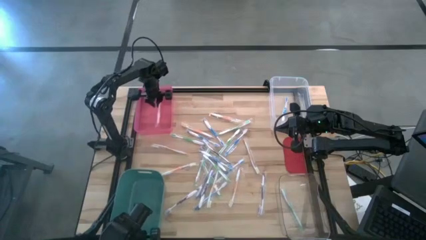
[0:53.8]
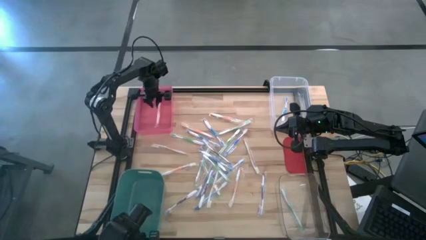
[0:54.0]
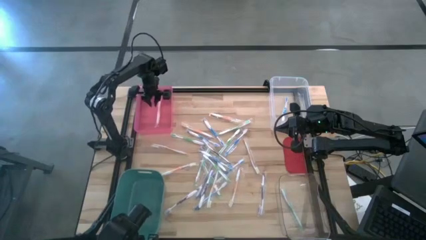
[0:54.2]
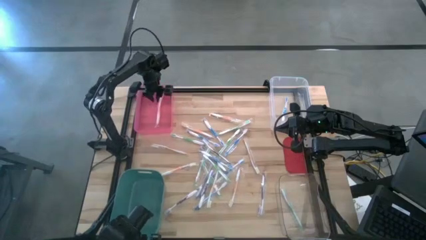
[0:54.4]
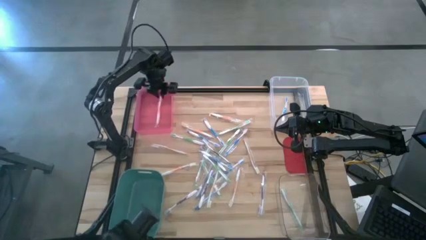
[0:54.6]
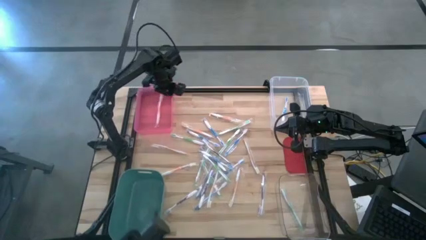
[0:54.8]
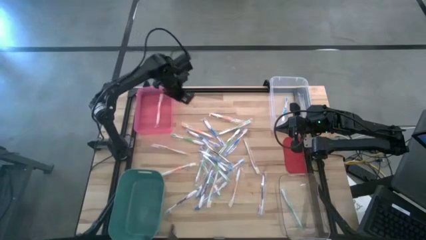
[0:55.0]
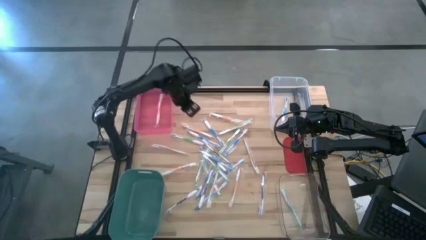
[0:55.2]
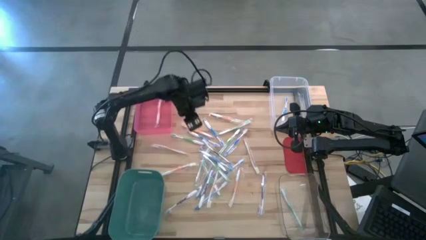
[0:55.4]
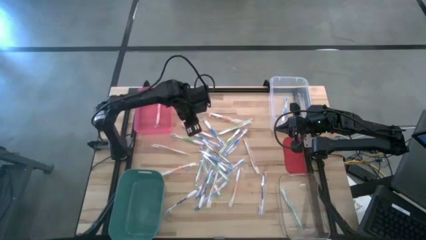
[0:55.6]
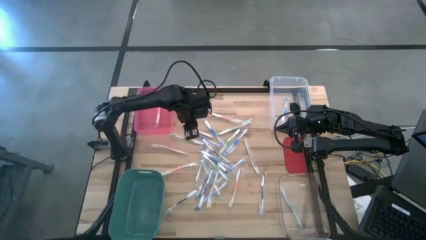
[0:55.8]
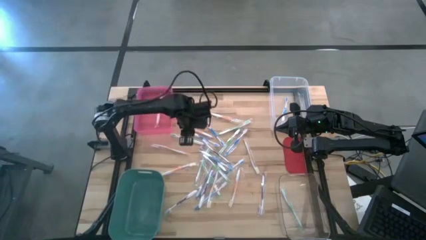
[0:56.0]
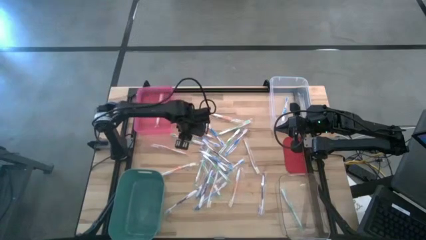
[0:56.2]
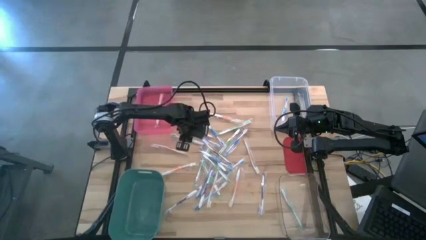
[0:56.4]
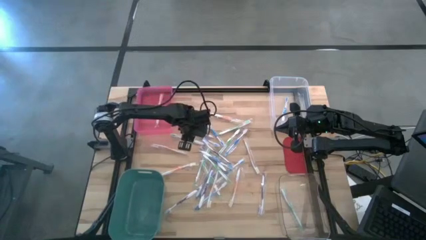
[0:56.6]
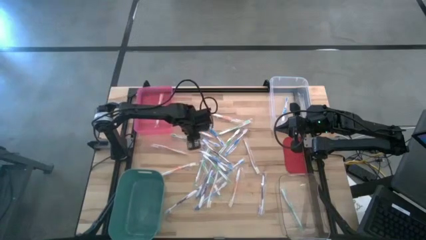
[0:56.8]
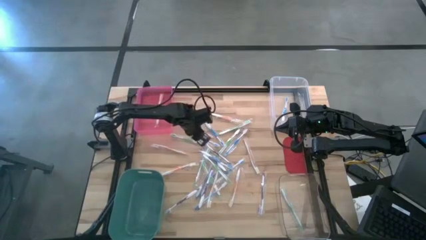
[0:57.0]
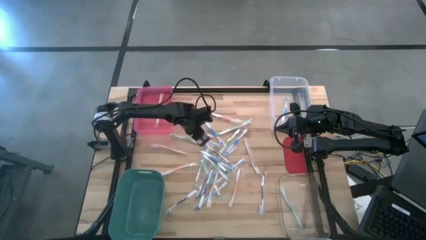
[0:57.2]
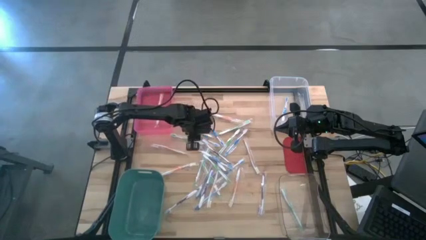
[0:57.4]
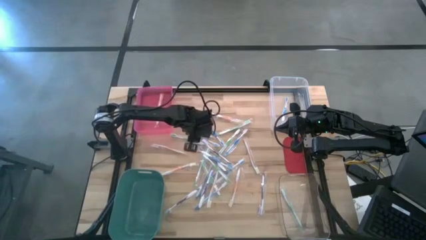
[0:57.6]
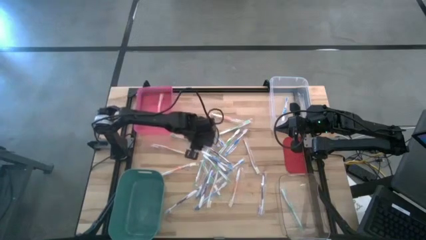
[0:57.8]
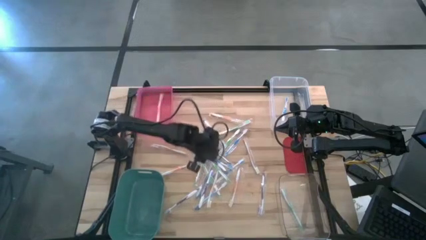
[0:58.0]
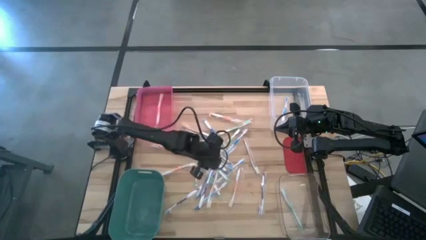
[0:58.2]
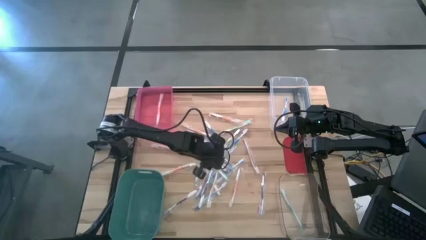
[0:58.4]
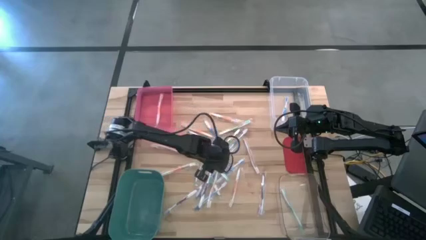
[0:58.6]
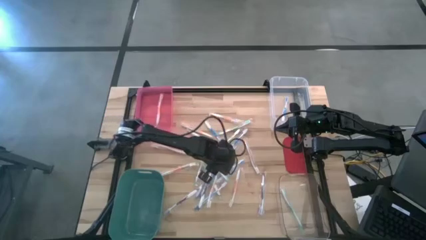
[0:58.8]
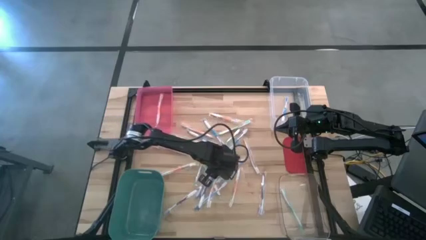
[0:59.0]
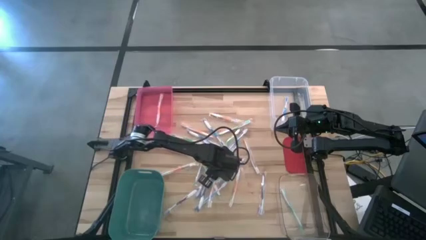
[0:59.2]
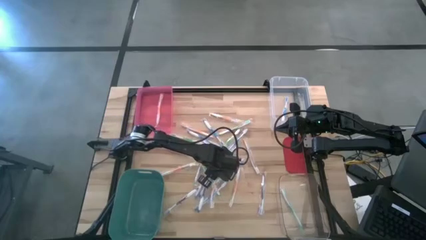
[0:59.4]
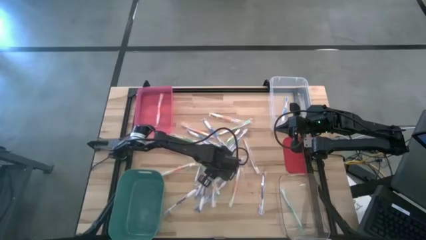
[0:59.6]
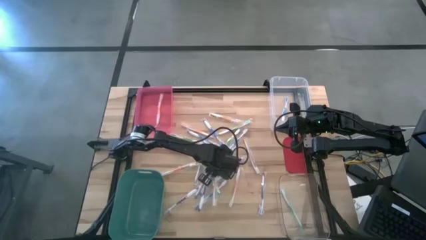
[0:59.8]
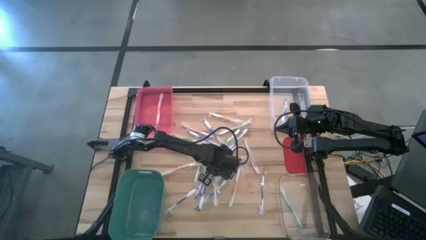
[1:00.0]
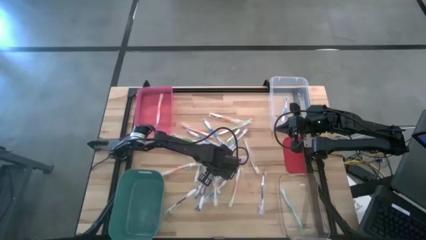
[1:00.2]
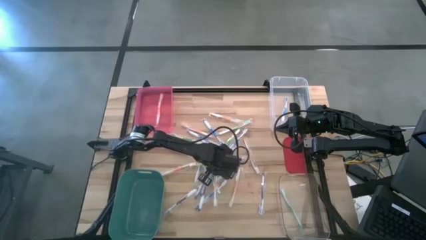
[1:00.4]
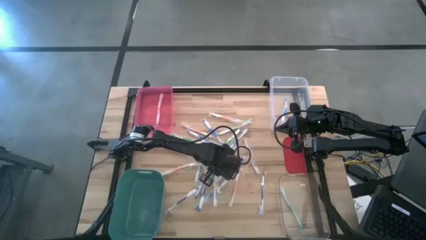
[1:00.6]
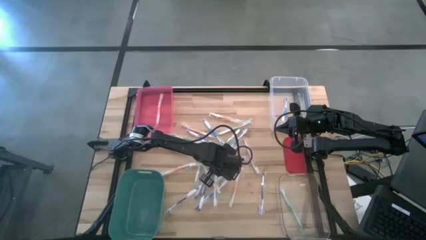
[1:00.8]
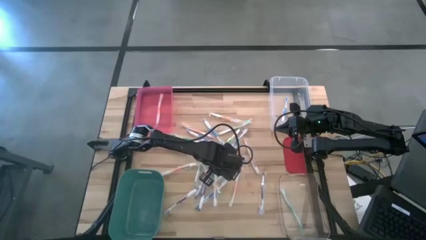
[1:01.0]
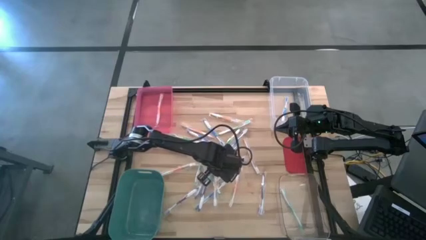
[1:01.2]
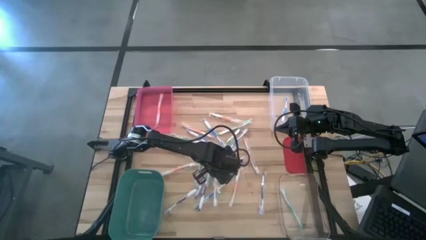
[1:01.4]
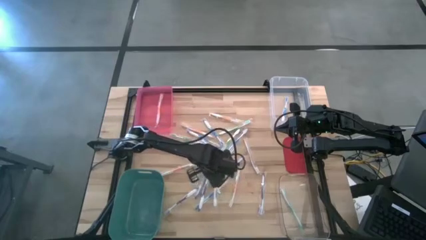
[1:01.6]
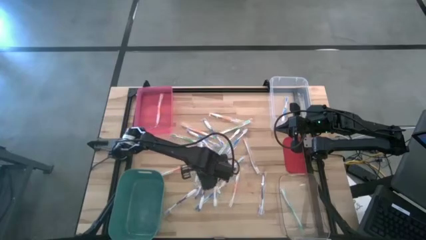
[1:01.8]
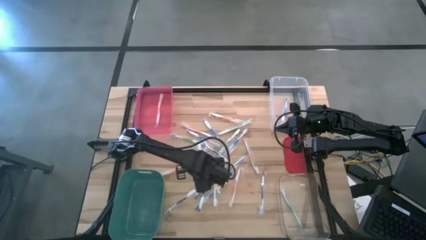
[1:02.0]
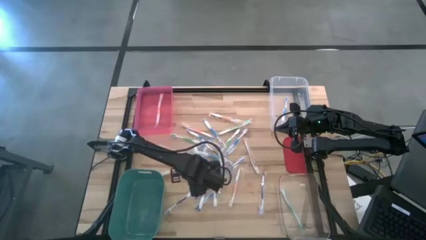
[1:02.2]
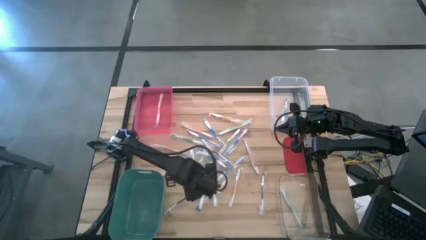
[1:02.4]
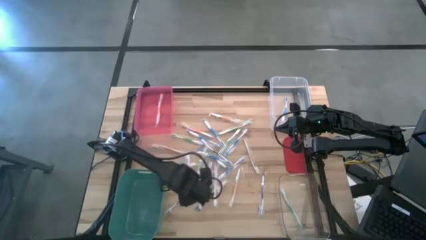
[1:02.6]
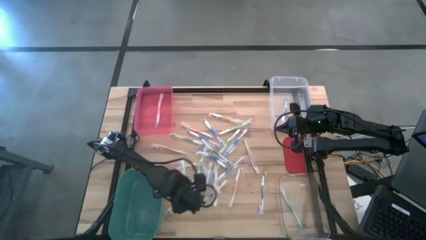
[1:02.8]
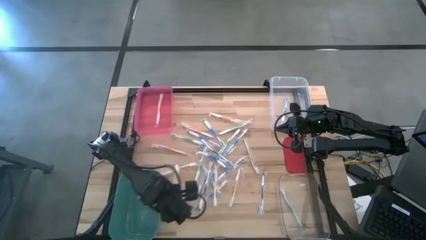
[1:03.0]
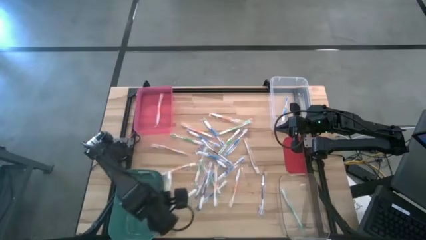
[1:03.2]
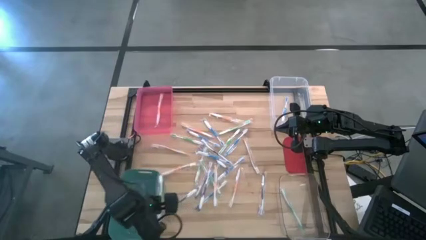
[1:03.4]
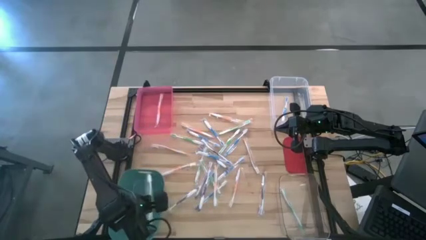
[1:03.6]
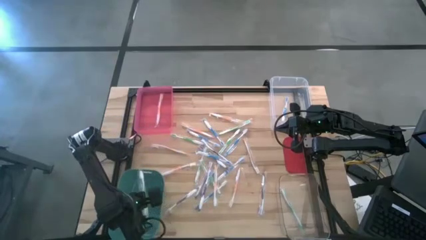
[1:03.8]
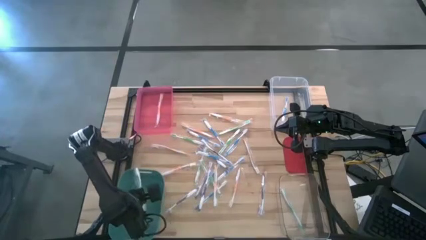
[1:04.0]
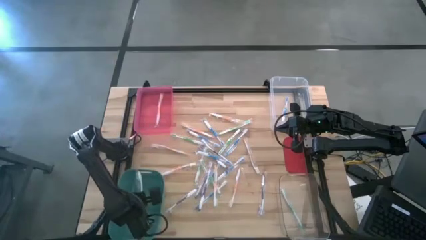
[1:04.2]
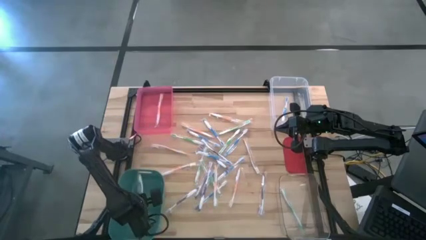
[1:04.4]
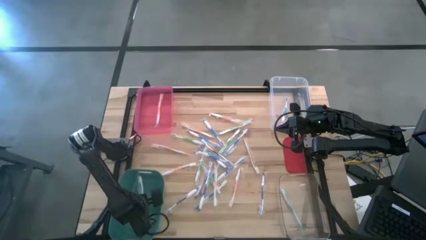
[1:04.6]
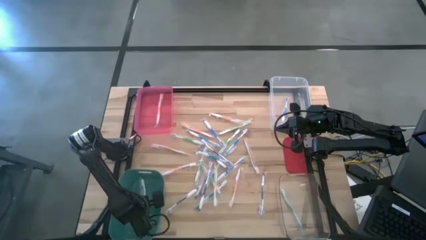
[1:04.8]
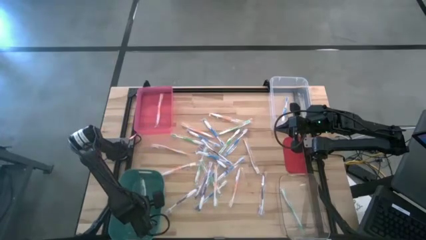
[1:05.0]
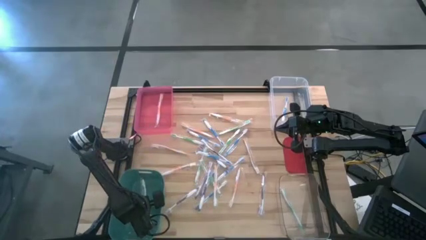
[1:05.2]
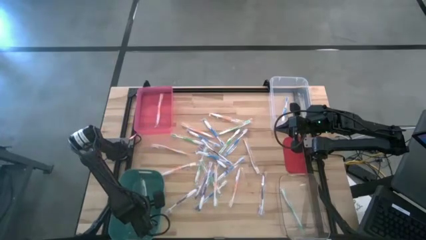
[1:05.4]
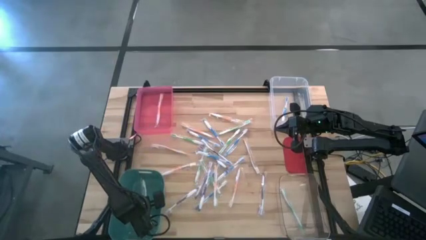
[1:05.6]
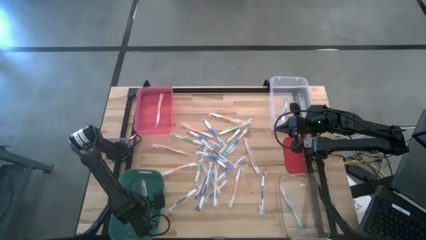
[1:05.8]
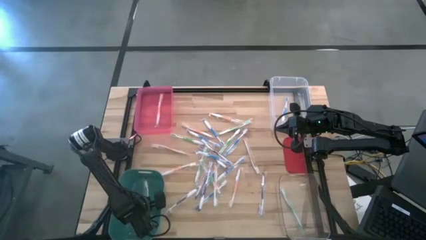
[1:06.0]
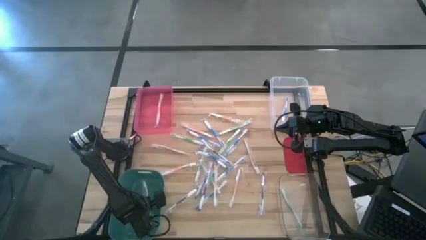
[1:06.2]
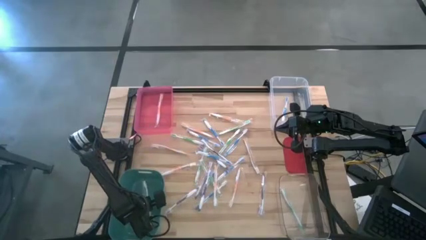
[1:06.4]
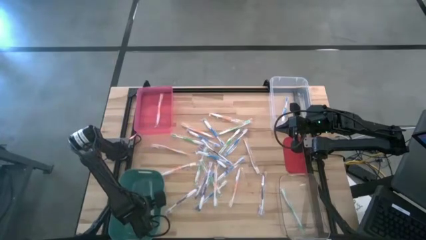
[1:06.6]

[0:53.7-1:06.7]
Task: Pick & Place Toothbrushes
Put the green toothbrush into the green bin
